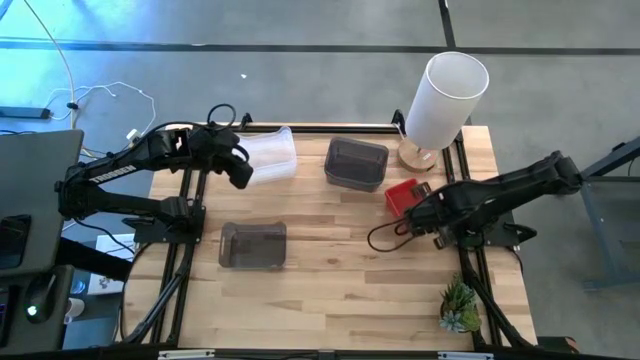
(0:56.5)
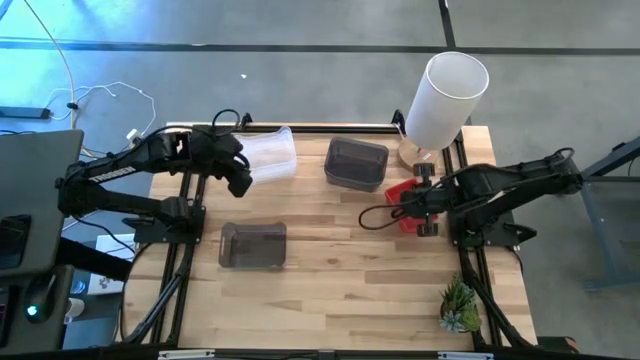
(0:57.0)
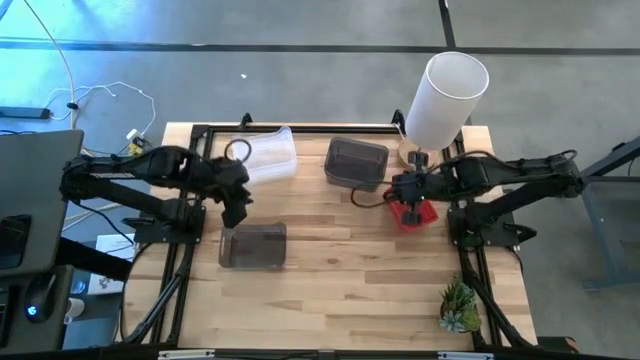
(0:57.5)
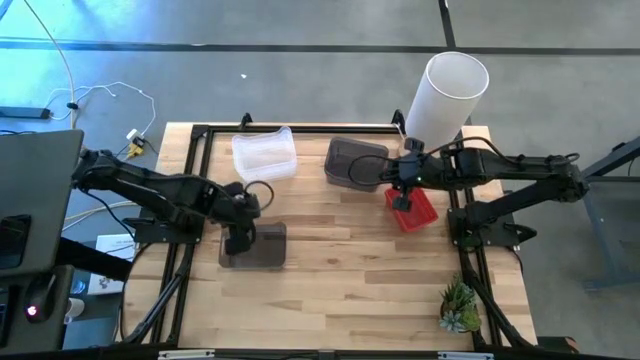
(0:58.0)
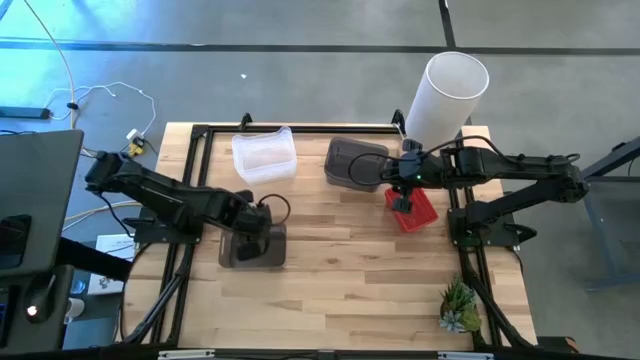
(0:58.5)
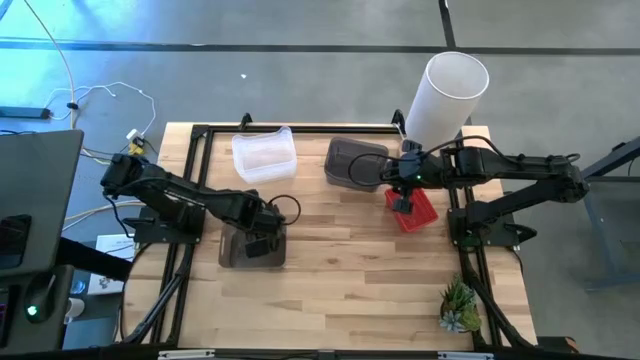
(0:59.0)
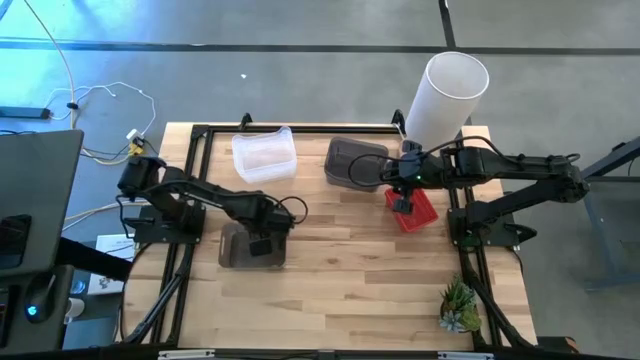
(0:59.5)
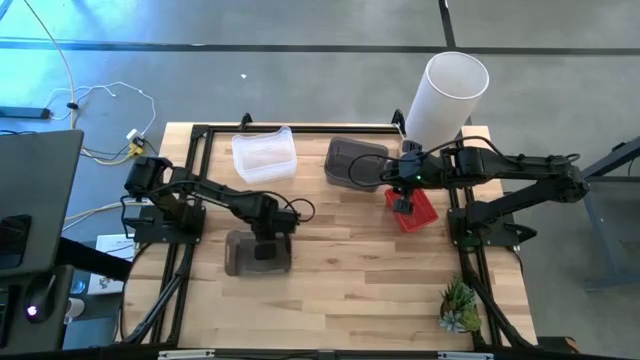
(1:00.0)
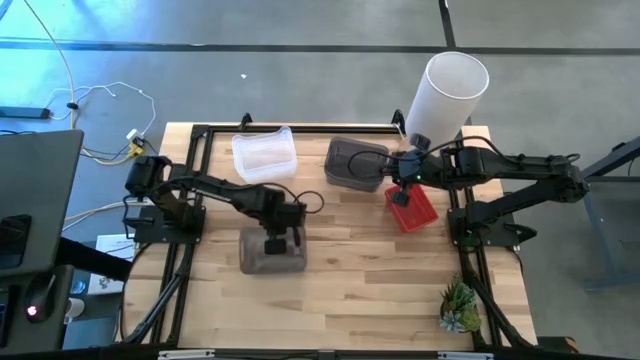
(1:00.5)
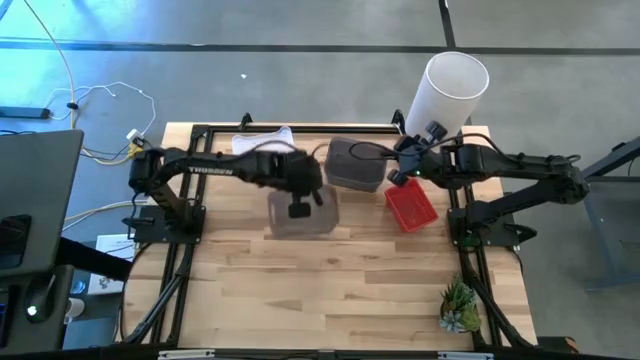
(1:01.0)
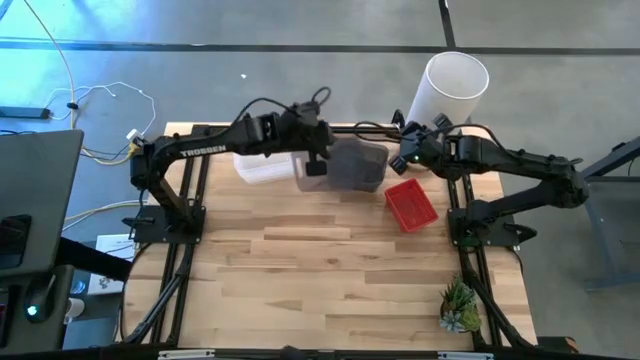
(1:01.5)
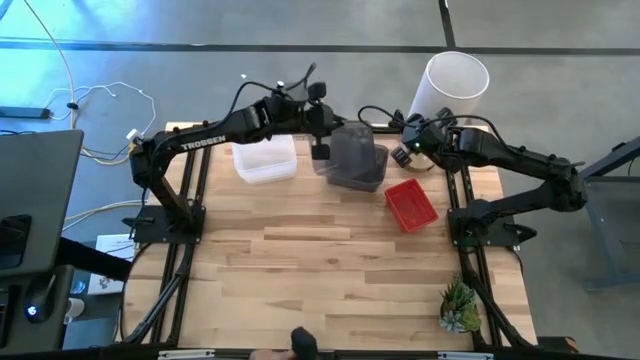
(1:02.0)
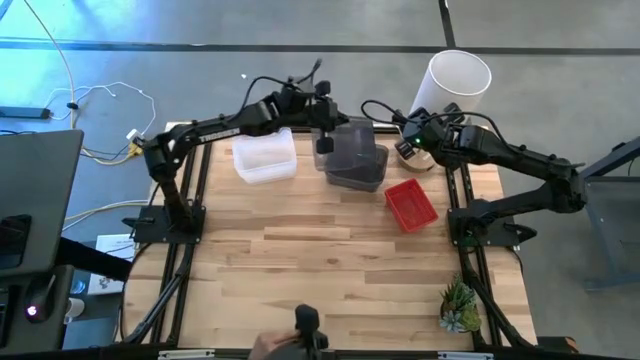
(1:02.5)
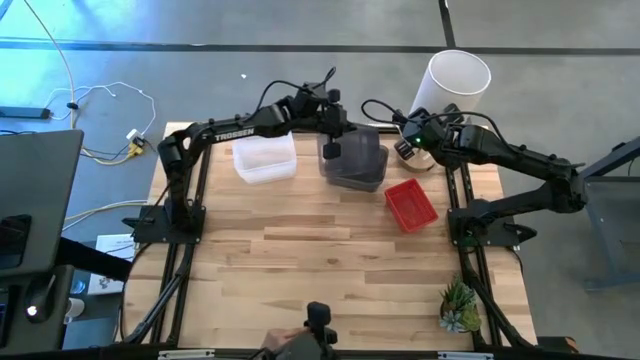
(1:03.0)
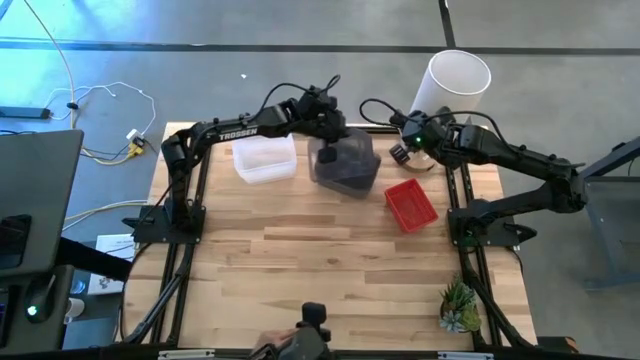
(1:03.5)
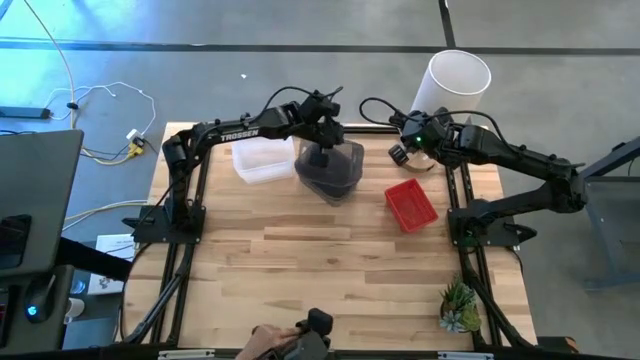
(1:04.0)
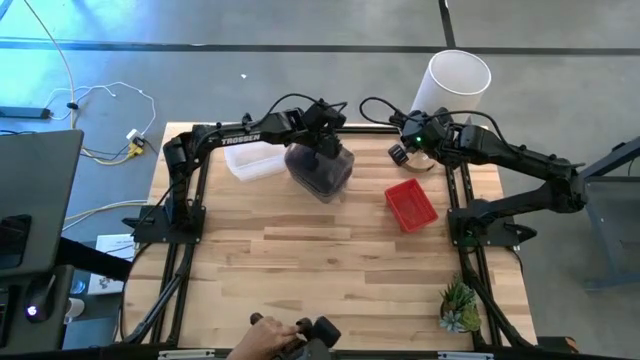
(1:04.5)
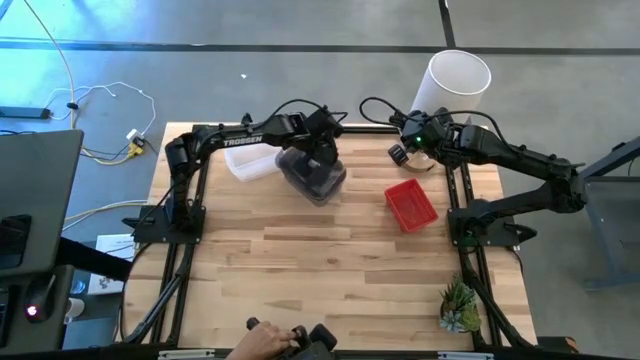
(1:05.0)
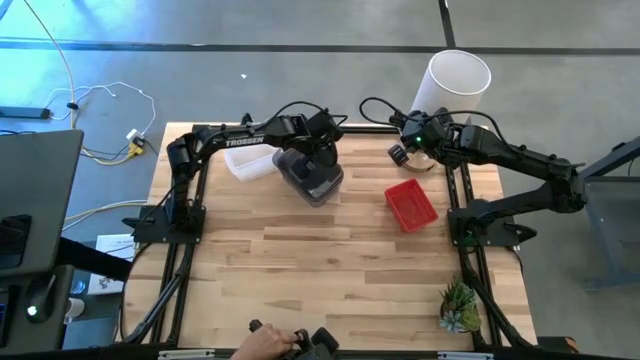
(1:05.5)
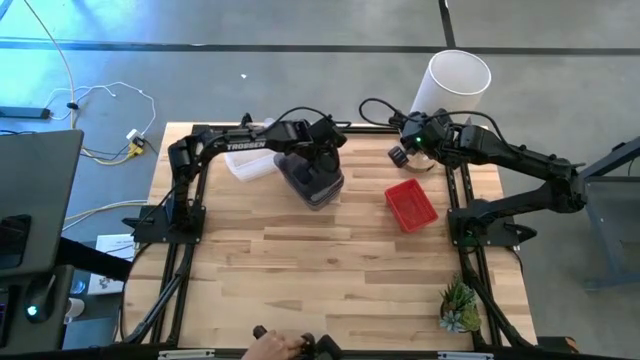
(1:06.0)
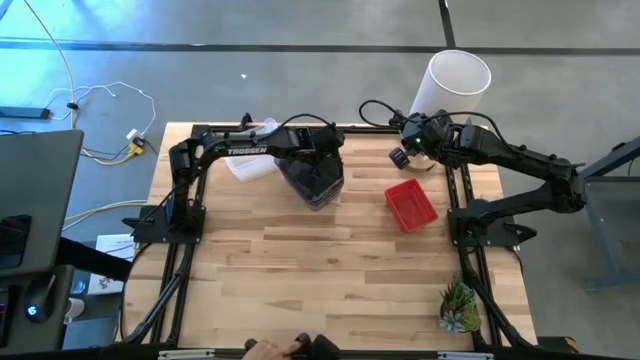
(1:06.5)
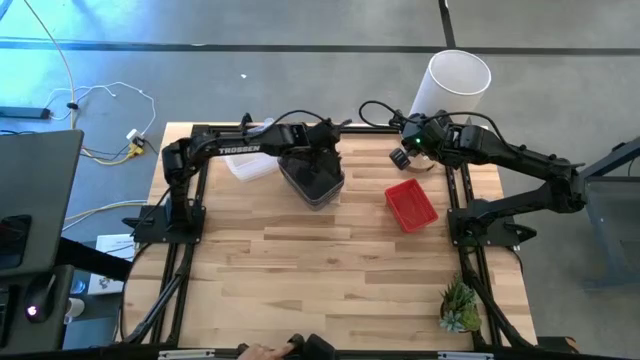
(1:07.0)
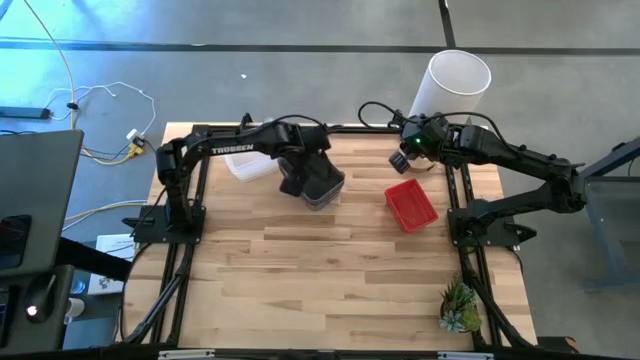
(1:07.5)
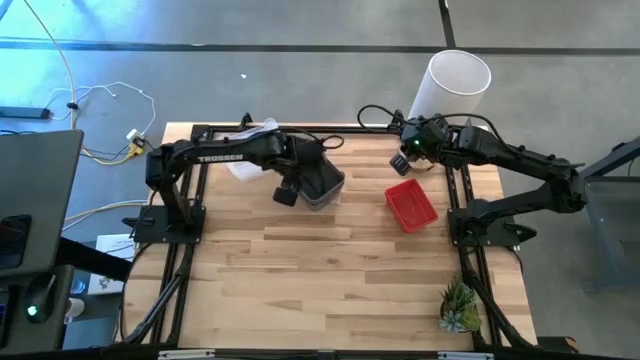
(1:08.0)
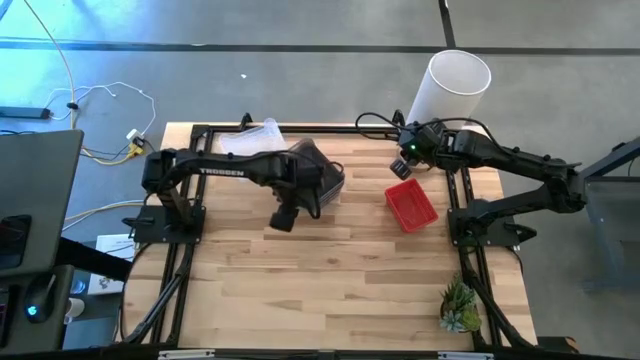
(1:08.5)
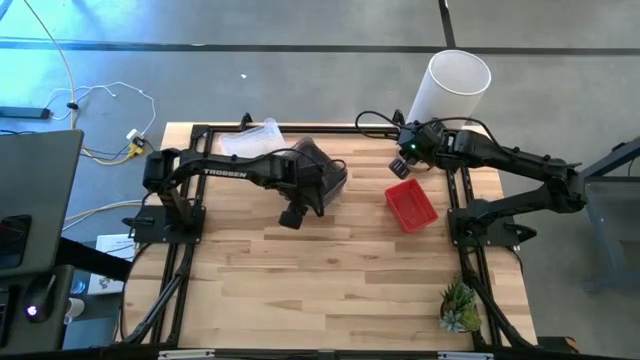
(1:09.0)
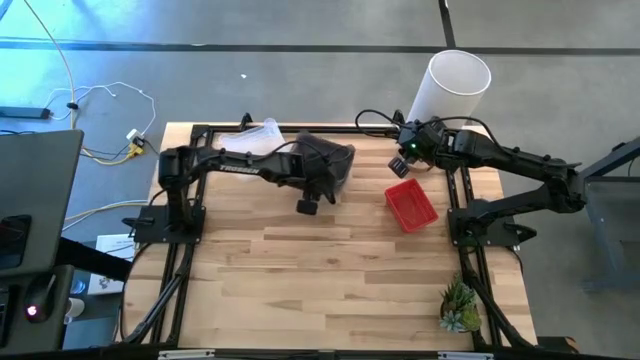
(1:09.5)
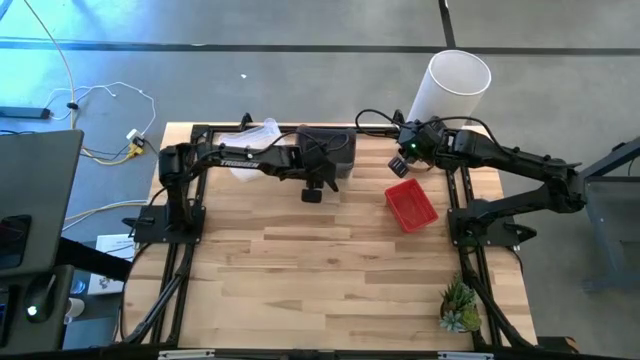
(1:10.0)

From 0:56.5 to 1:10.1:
Stack the bottom black bin on the top black bin

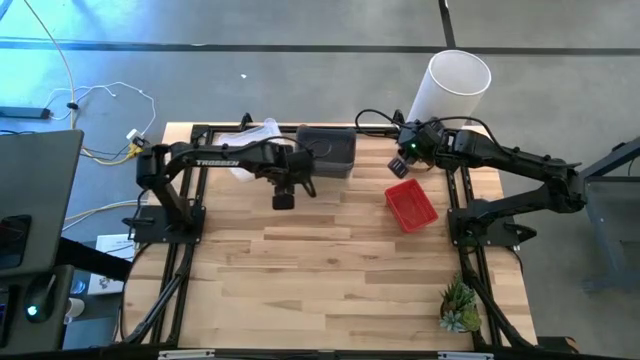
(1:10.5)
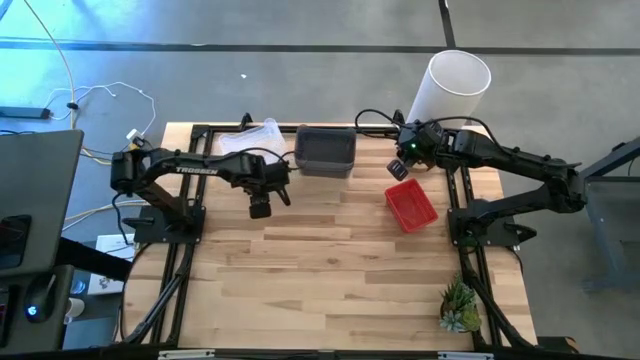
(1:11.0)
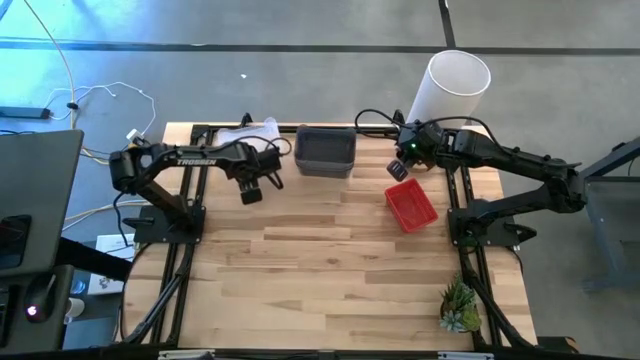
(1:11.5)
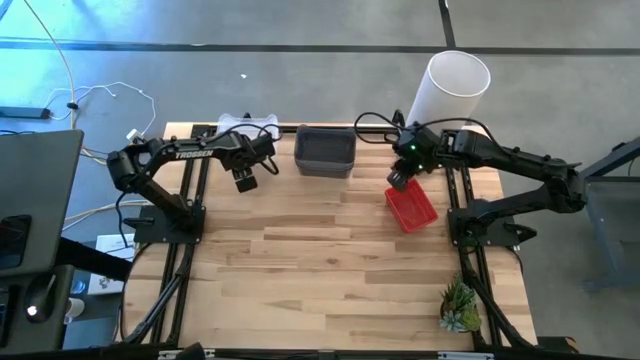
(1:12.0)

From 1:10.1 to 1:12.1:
Adjust the stacked white bin

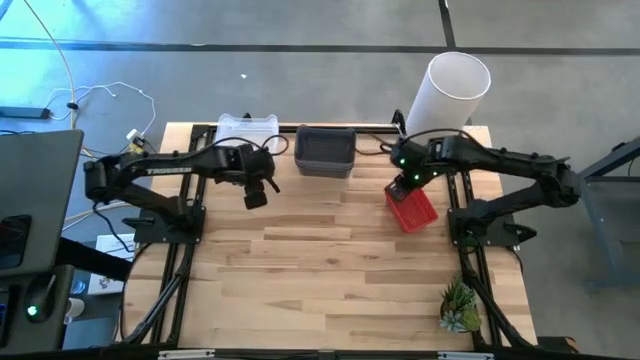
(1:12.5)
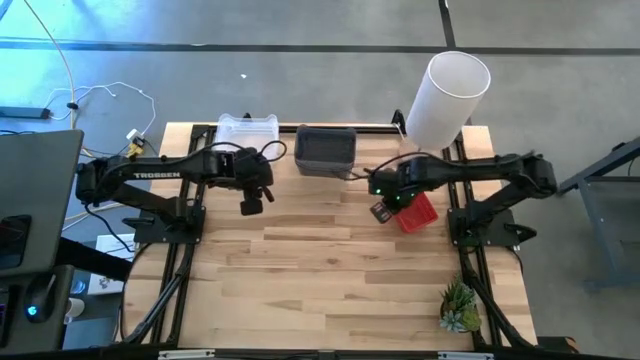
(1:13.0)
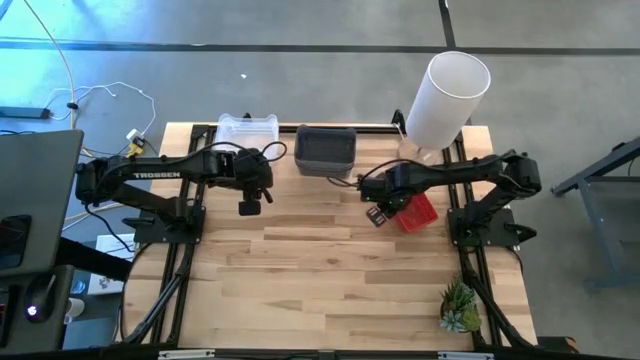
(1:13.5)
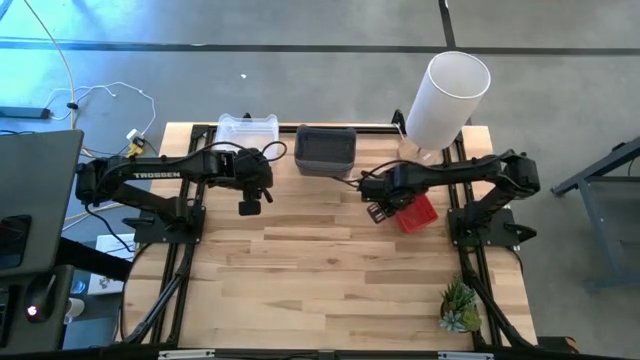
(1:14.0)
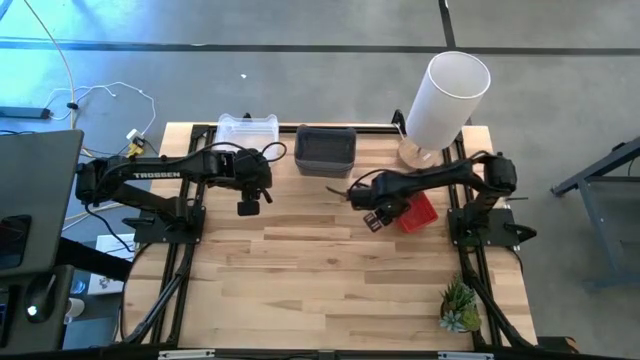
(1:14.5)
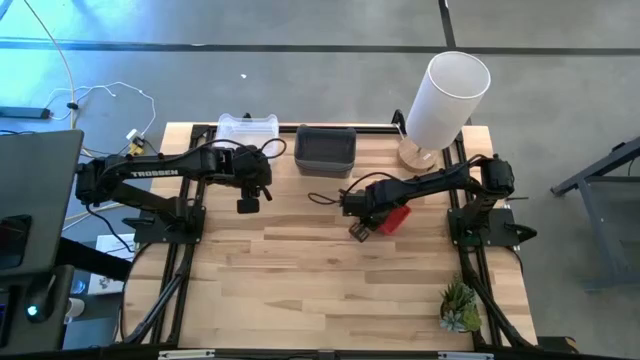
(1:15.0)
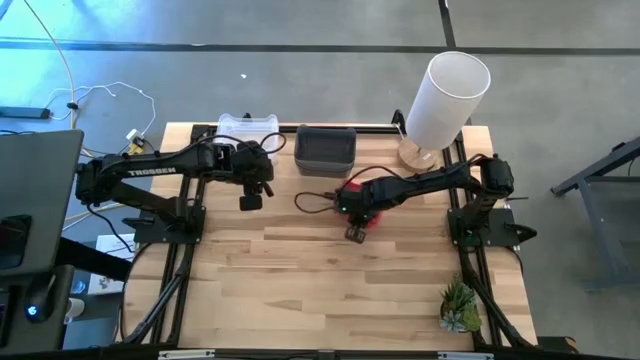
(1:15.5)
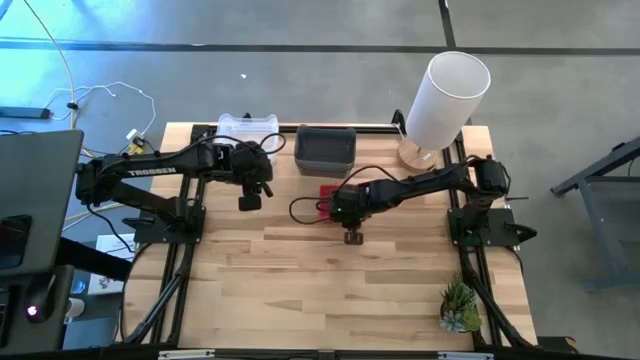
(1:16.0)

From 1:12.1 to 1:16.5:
Adjust the stacked red bin
